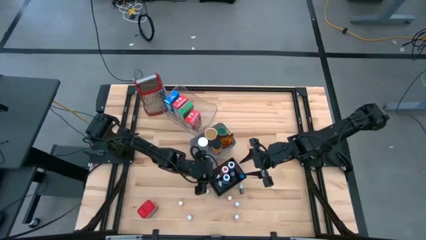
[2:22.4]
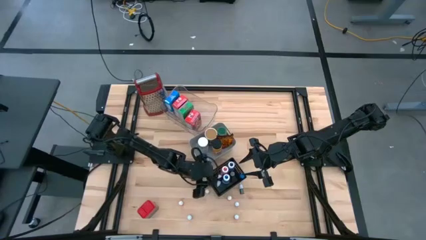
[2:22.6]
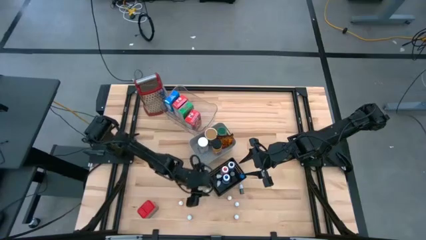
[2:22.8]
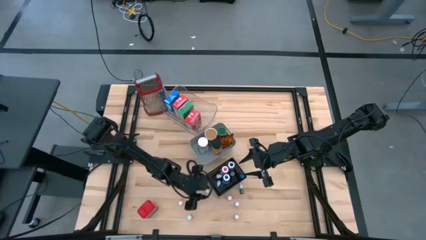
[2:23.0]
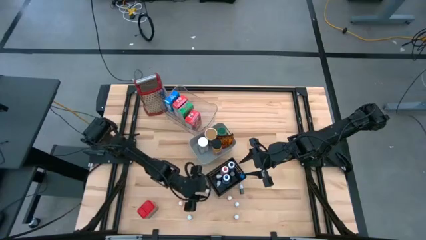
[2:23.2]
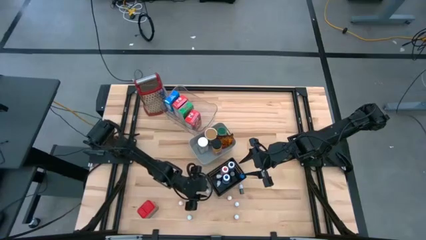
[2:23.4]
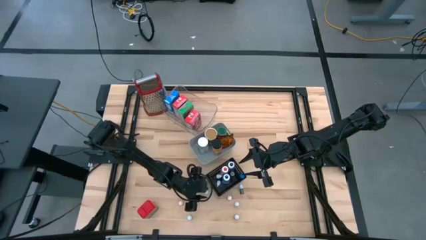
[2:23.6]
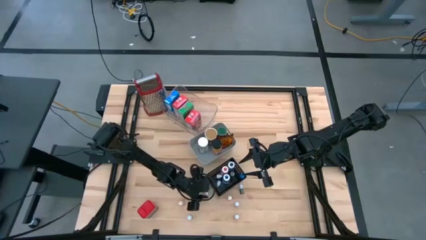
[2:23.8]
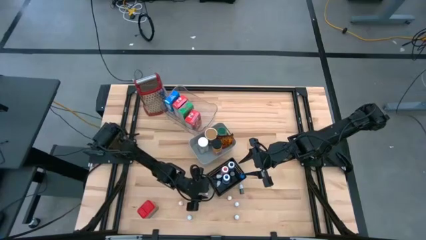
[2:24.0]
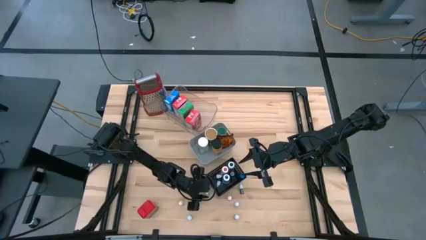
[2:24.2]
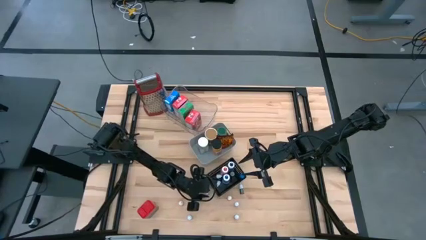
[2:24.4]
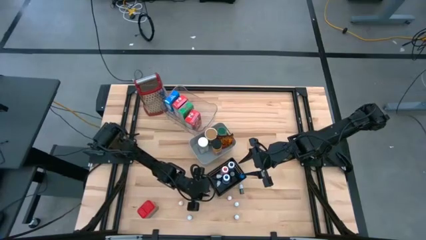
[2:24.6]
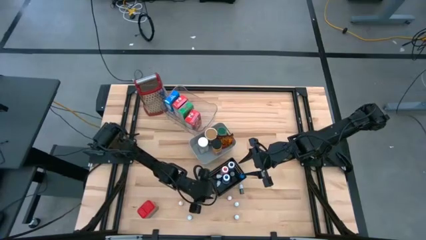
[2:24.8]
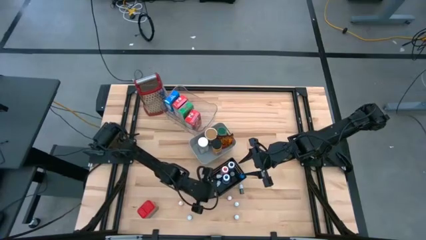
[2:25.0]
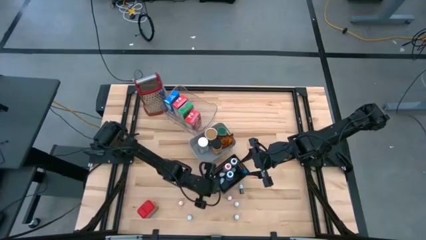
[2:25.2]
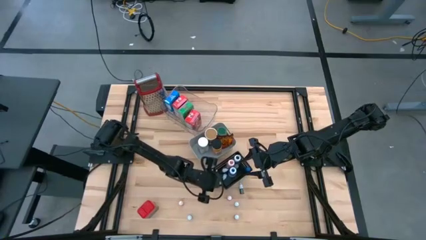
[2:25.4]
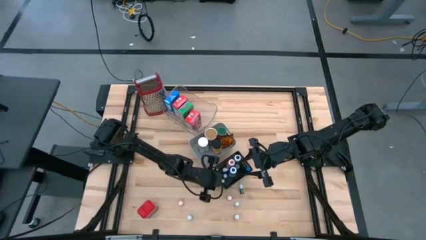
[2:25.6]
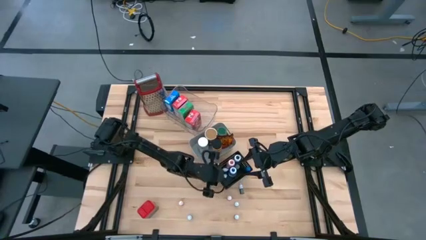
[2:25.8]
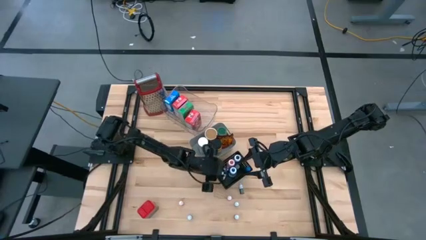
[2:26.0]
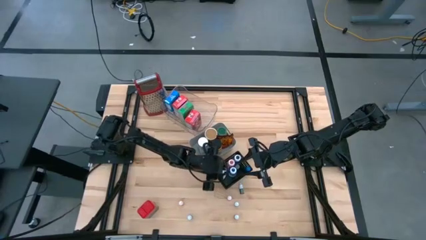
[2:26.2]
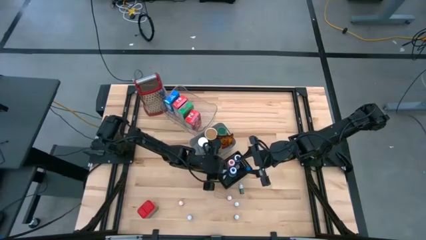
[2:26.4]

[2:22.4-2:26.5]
Task: Pick & Place Kitchen Items
Put the orange small food coloring bottle into the black bin

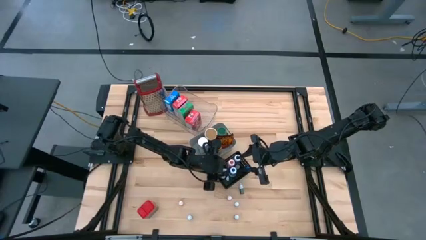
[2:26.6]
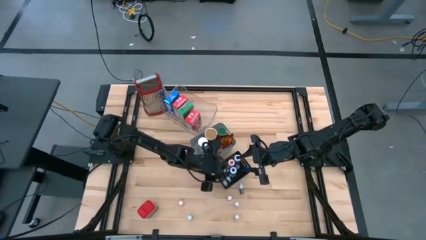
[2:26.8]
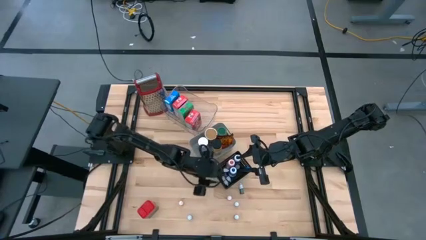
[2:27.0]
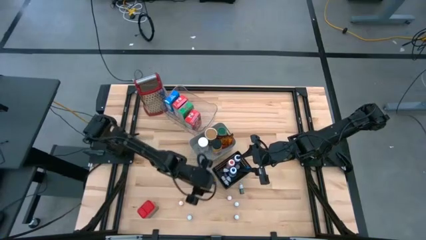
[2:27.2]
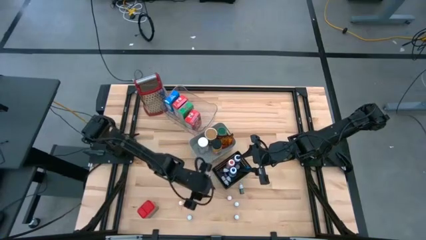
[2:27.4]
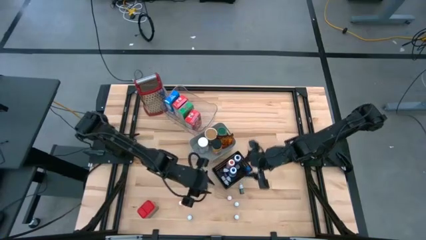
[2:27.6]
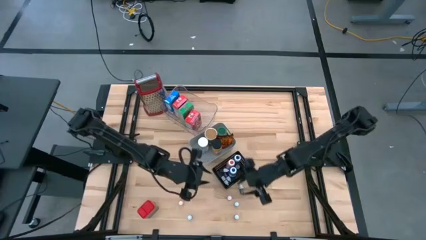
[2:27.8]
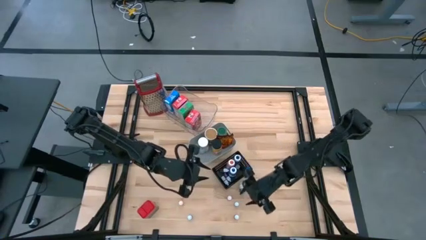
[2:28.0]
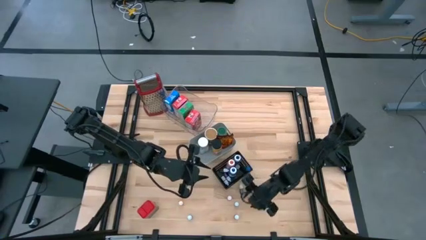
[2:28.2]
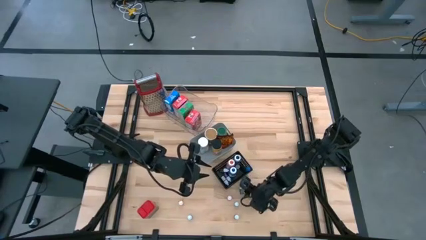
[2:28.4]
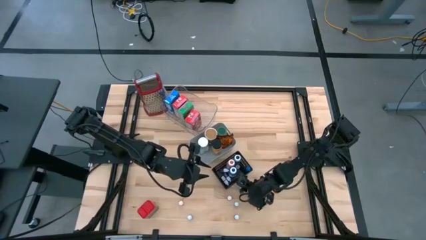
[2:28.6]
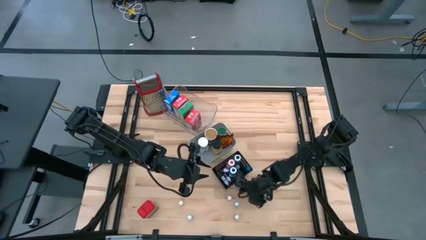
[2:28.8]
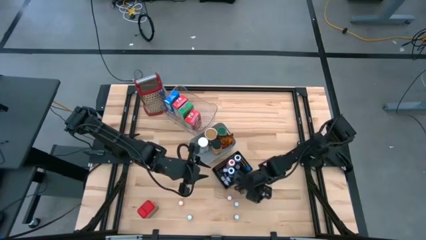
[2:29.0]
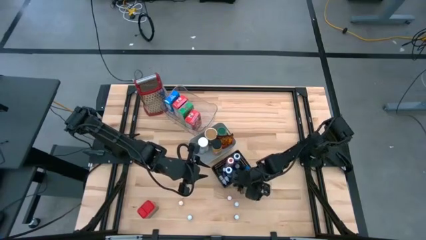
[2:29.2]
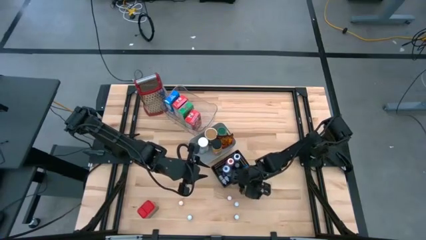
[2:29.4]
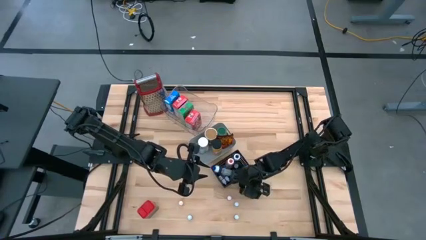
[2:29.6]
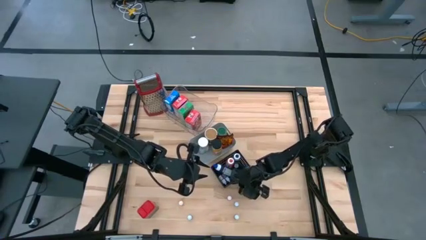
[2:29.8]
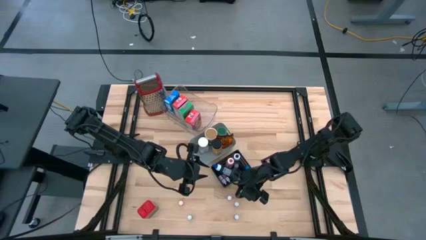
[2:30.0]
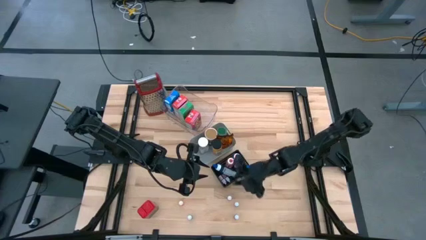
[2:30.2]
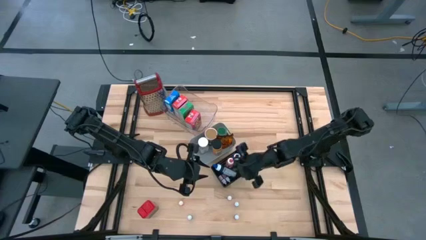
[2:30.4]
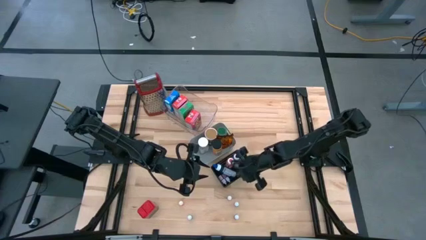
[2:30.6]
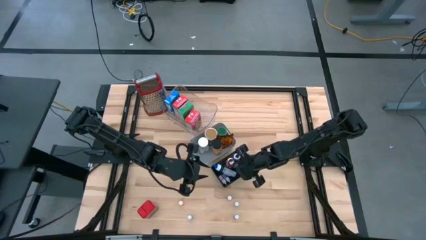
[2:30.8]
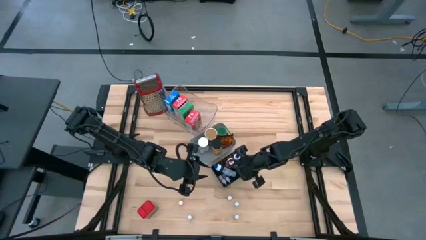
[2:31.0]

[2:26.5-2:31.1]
Put the green small food coloring bottle into the black bin

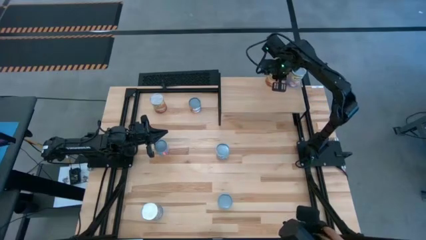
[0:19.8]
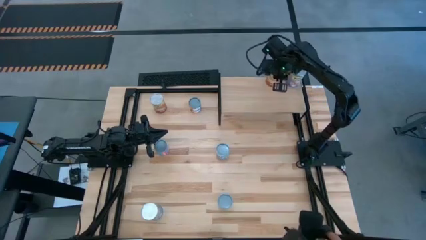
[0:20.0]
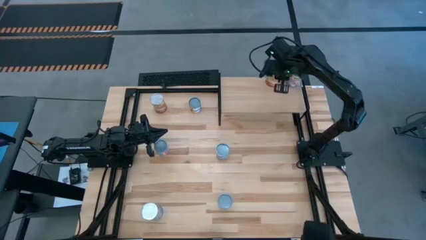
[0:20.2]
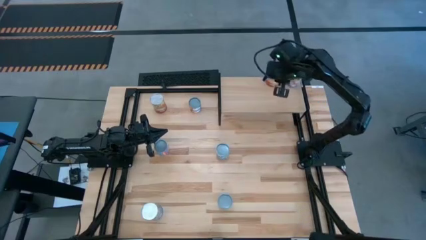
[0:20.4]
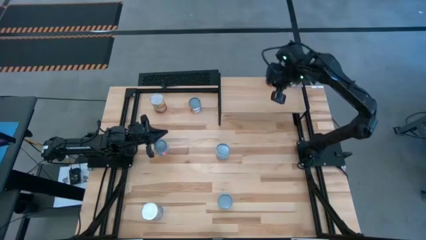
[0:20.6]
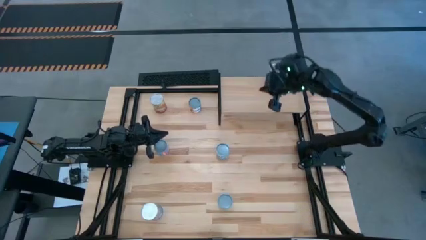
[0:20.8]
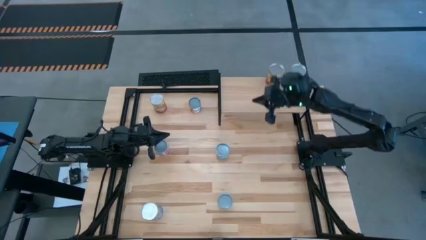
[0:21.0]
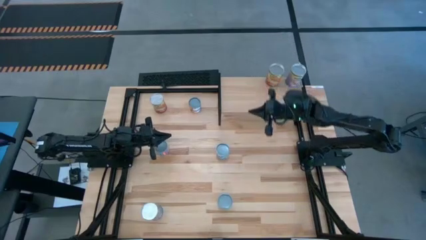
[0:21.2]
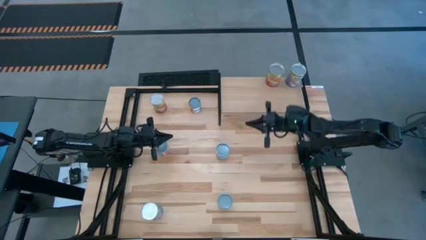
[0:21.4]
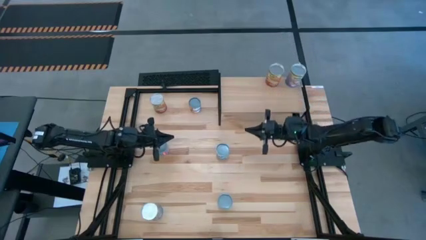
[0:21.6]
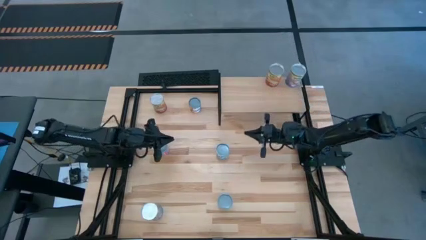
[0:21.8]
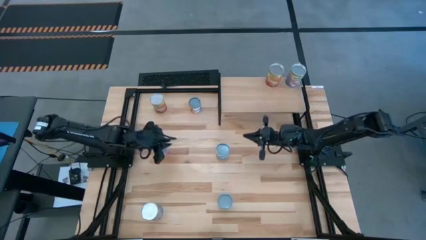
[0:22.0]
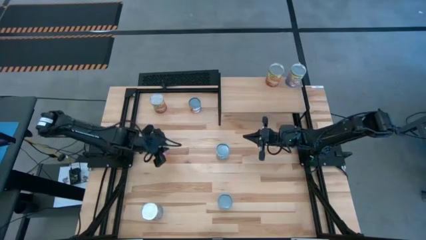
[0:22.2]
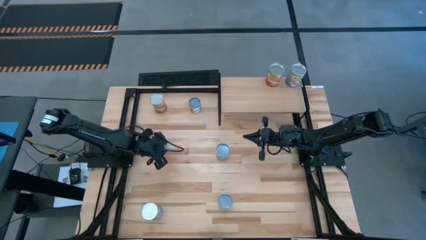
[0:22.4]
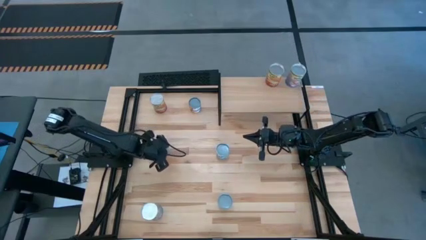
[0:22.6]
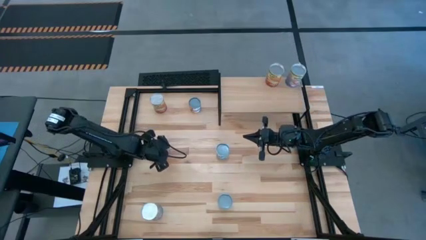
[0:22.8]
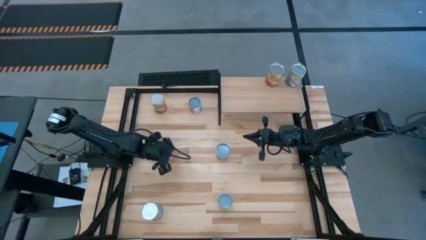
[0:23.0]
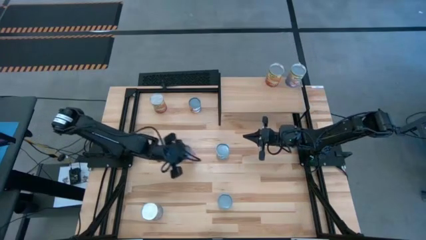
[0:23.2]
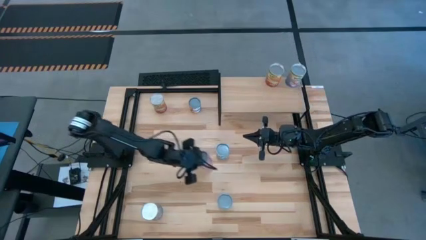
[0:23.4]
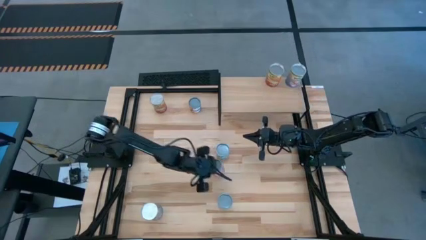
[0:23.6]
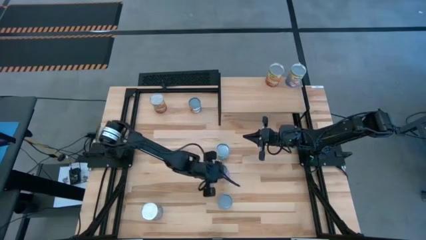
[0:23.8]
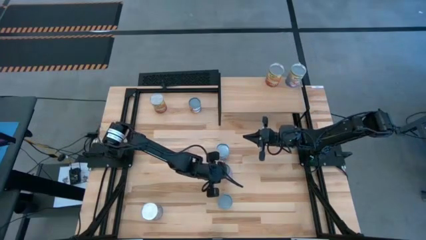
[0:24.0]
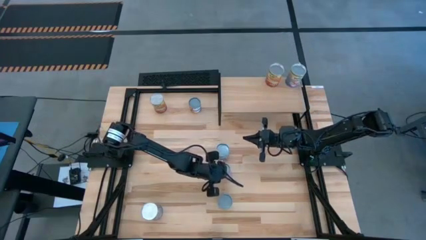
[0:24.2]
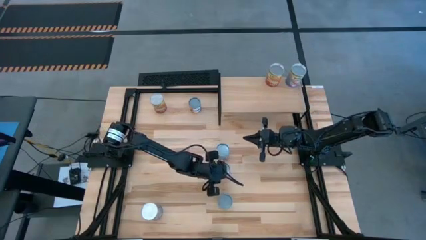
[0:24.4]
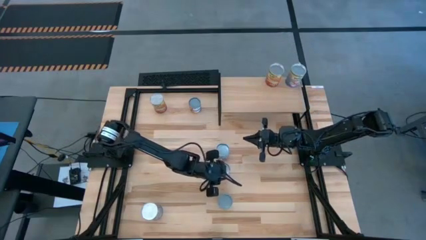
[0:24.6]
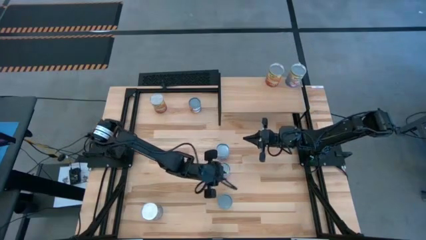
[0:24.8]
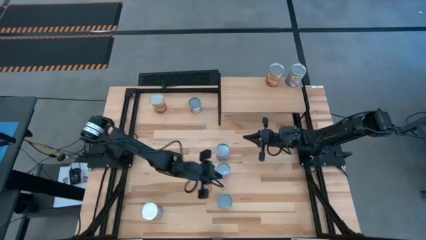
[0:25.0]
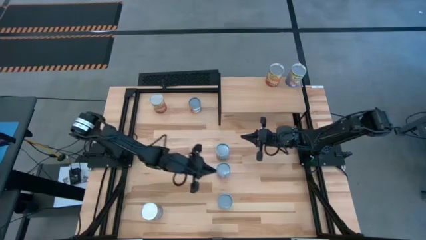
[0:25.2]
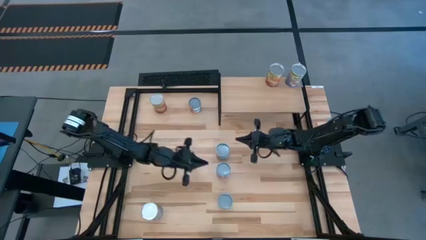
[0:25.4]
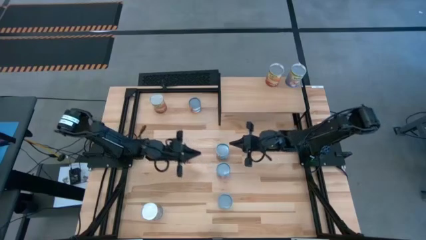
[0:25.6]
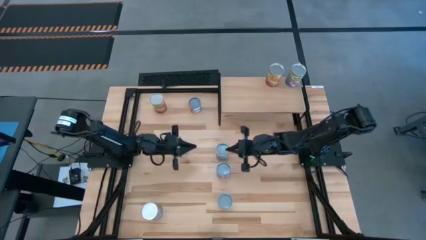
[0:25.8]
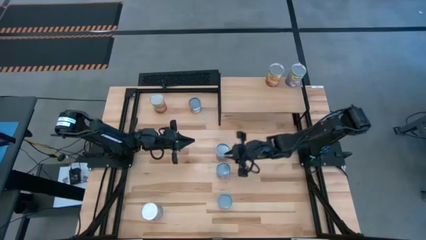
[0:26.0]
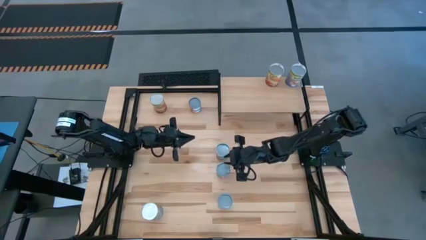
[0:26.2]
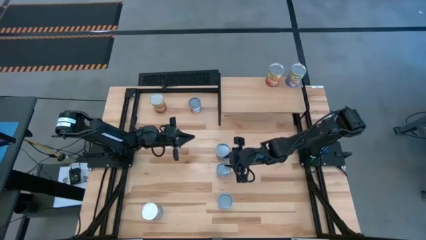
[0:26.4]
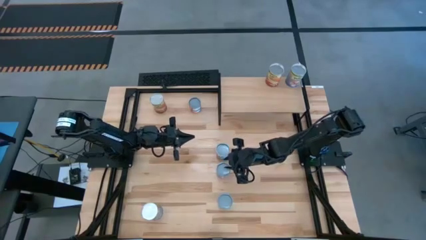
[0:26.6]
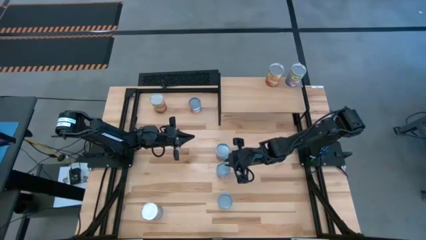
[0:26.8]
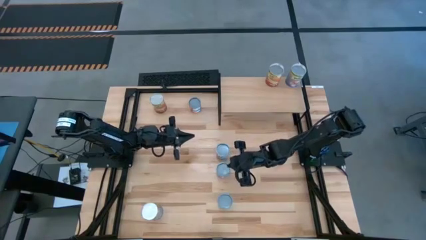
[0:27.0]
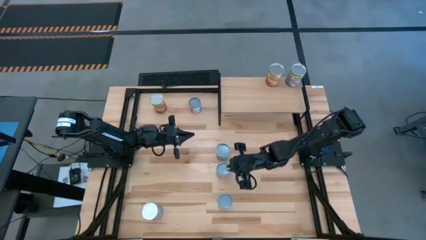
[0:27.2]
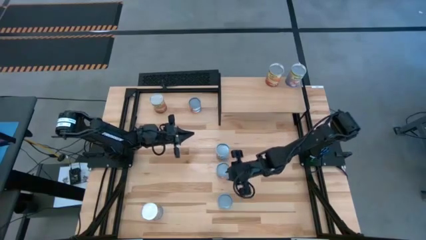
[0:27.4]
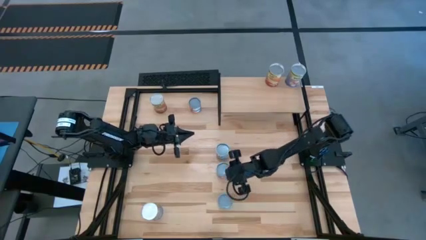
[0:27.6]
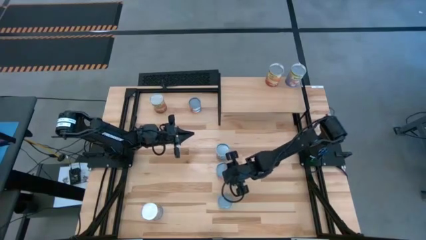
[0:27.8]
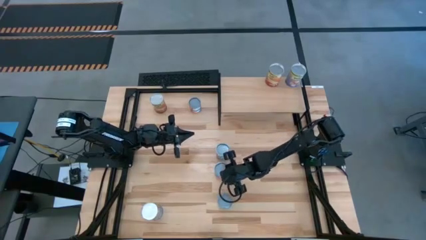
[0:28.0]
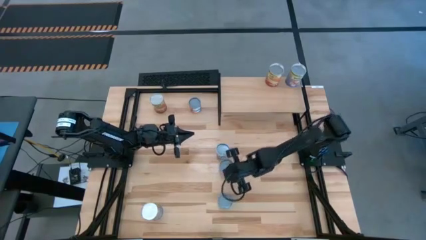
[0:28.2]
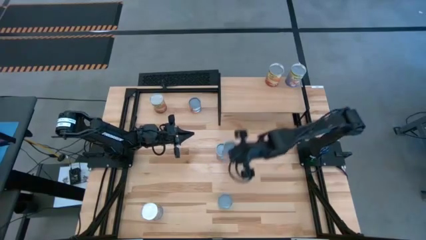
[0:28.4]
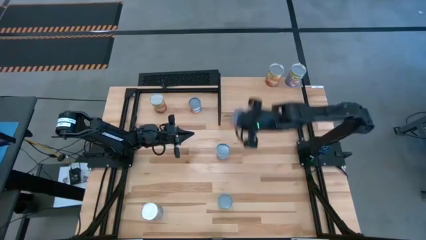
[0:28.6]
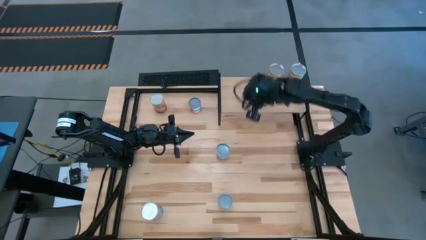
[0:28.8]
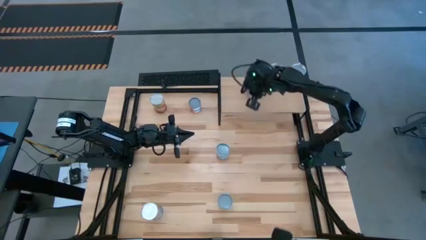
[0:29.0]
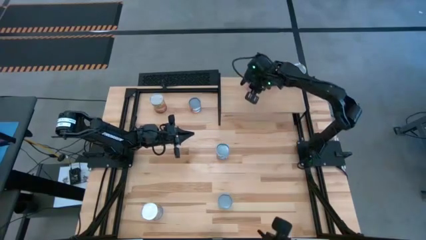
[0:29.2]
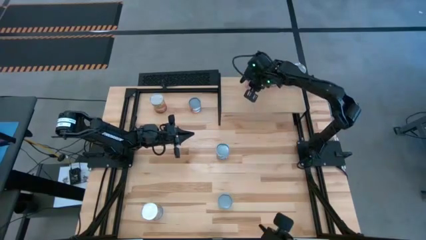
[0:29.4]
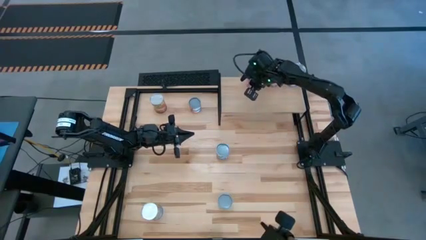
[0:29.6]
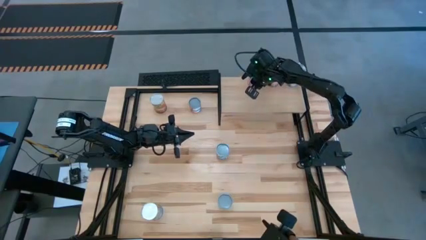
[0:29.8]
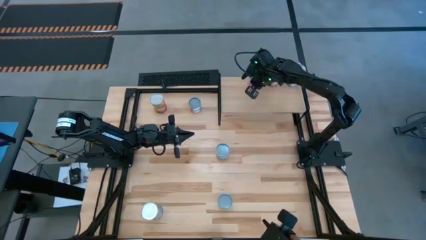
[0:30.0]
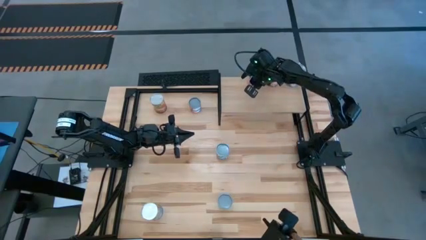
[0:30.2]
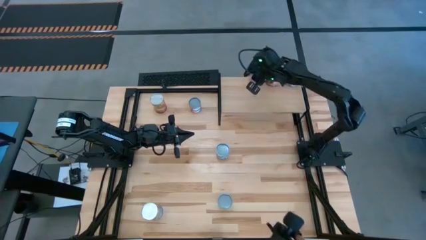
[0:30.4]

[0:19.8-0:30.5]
Task: Pick and place cans onto a shelf
Put the small canned corn on the shelf
